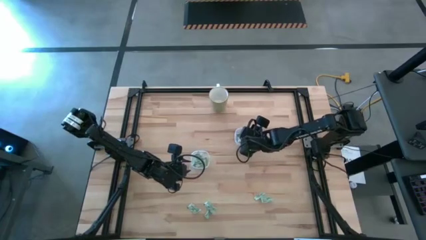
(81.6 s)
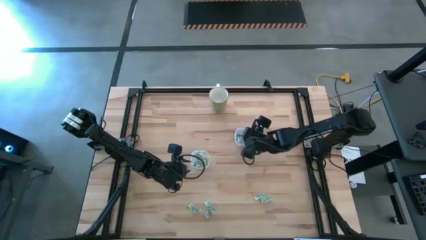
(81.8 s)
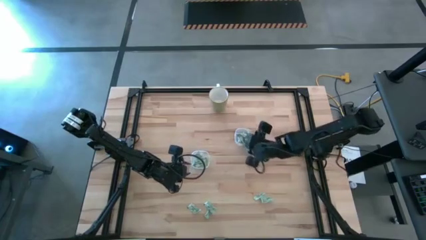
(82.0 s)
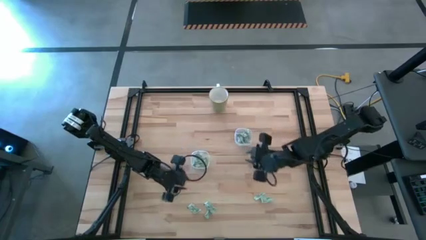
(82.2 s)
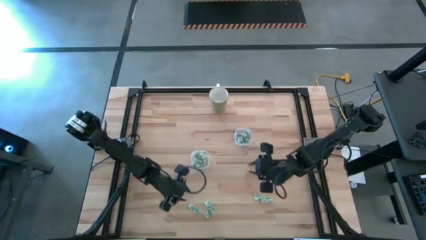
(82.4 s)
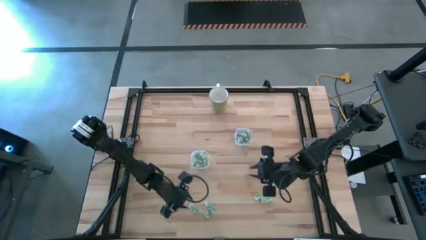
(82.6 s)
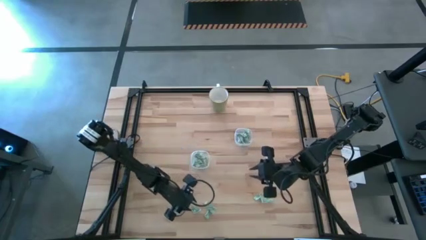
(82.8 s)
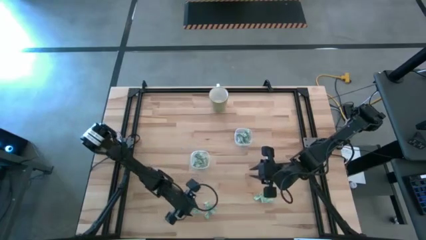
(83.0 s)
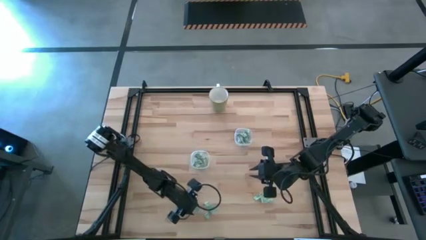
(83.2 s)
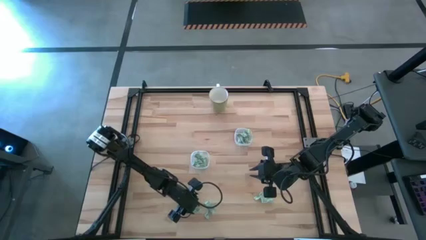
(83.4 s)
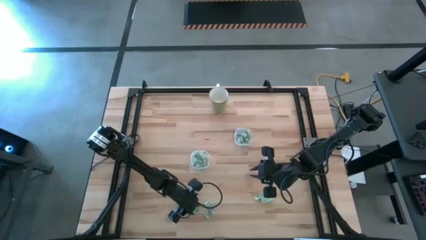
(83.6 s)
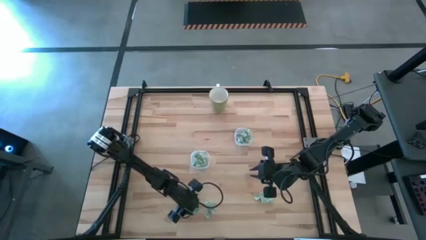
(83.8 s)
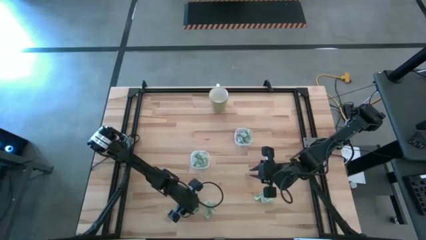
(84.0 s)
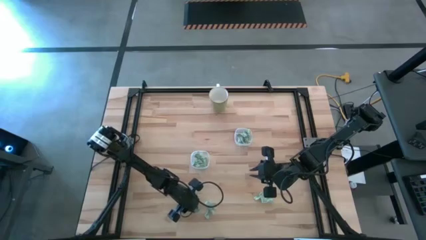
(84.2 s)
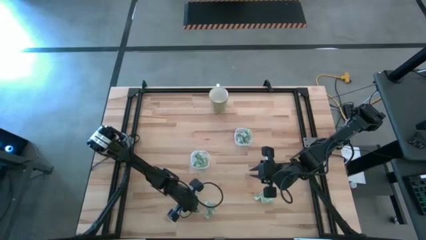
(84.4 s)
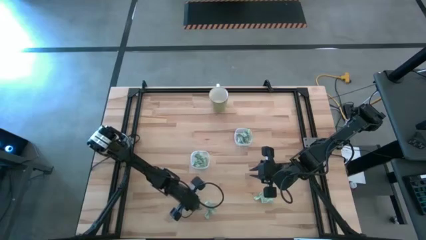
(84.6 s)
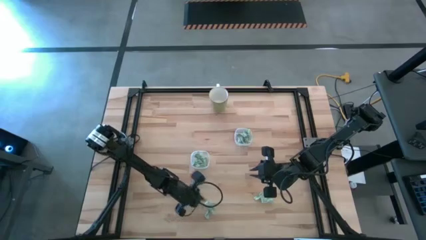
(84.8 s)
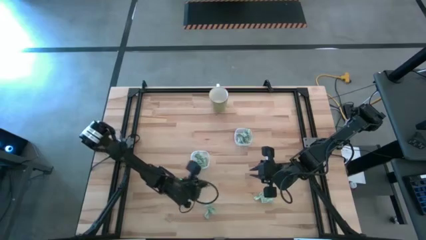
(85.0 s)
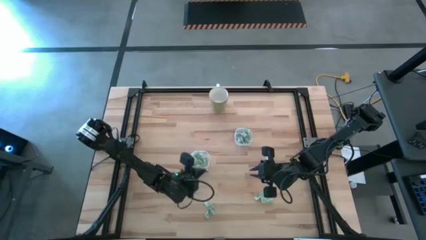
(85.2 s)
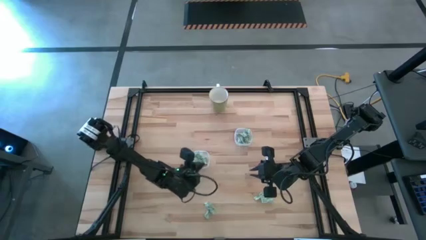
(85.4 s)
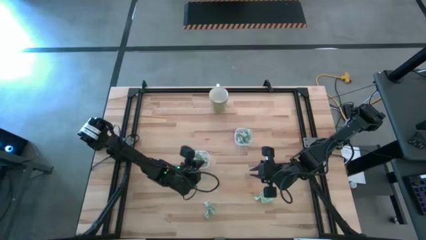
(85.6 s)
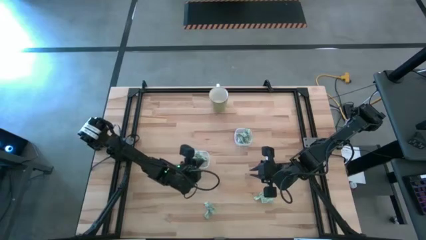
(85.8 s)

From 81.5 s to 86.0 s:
Task: Pick and place Stevia / Truvia into bins
Put the green stevia packet into the left transparent container

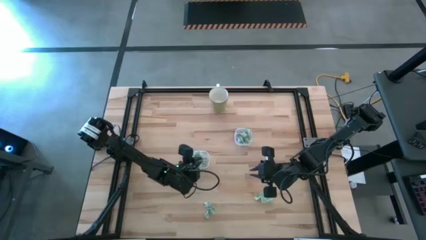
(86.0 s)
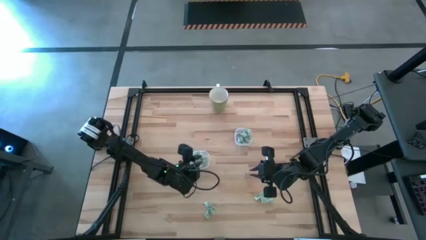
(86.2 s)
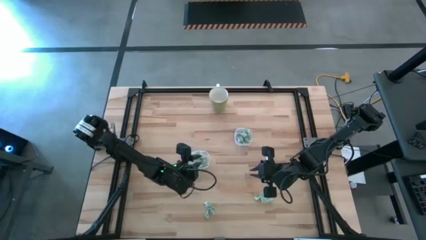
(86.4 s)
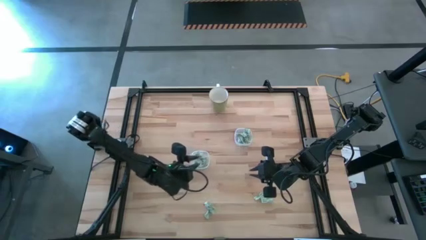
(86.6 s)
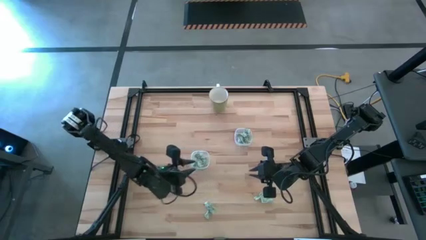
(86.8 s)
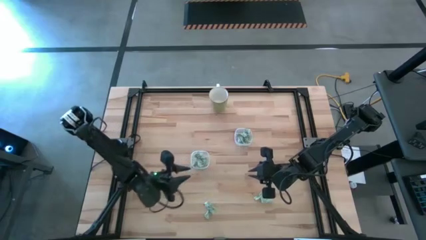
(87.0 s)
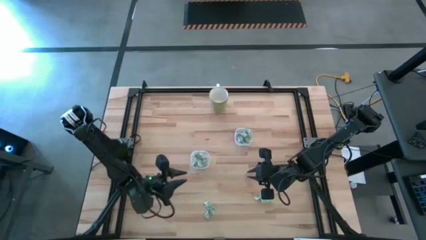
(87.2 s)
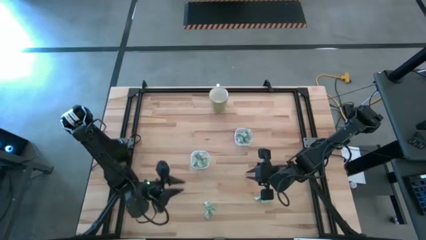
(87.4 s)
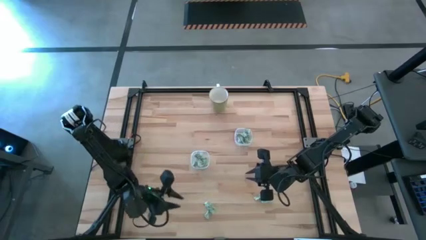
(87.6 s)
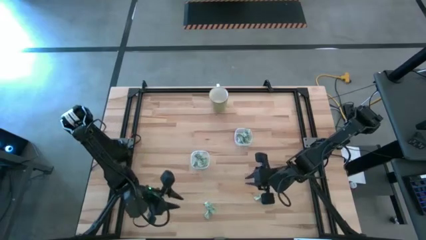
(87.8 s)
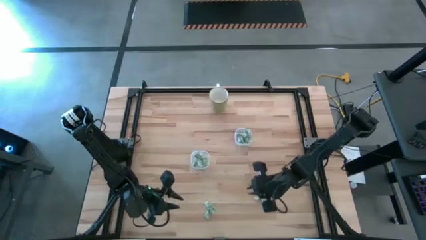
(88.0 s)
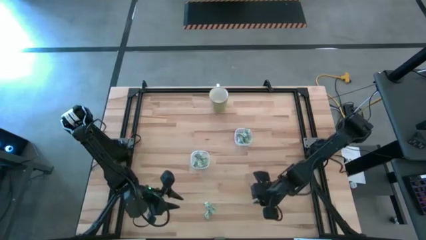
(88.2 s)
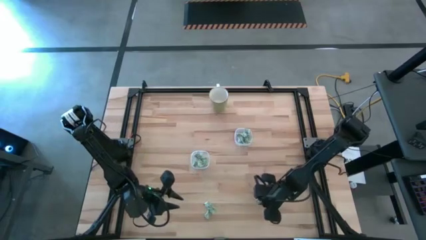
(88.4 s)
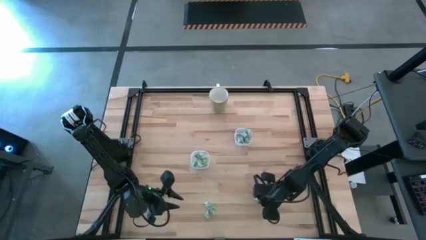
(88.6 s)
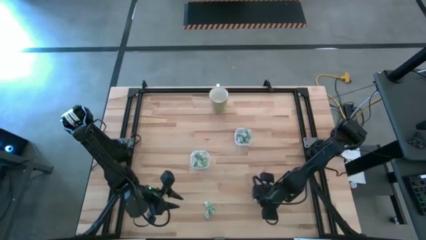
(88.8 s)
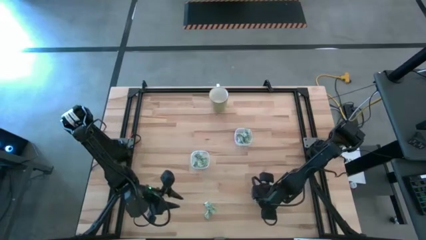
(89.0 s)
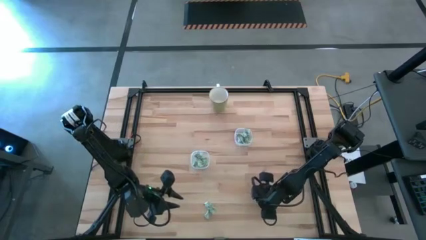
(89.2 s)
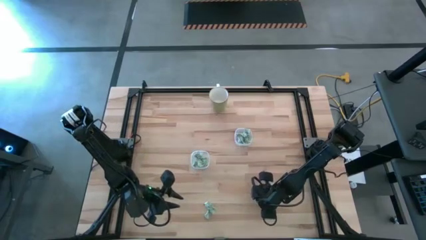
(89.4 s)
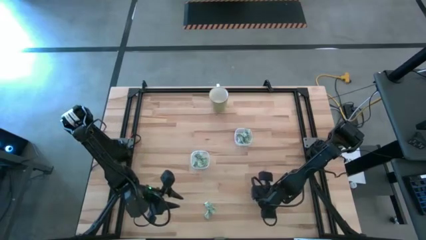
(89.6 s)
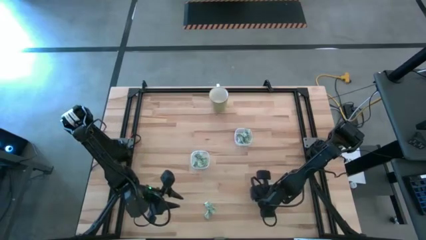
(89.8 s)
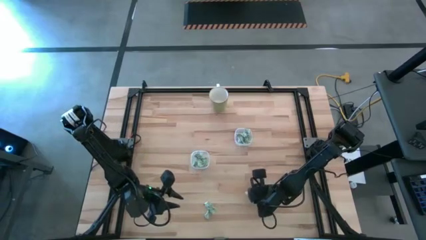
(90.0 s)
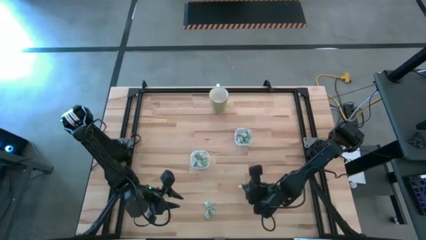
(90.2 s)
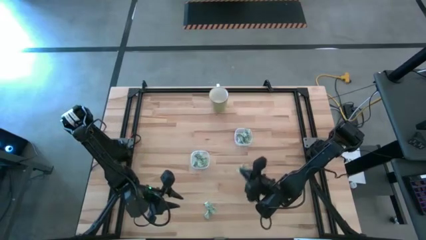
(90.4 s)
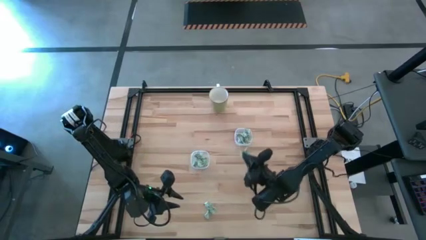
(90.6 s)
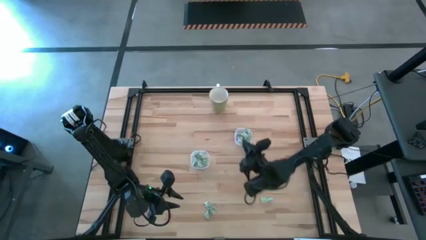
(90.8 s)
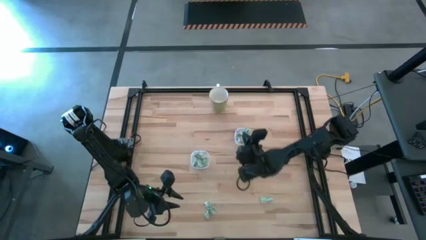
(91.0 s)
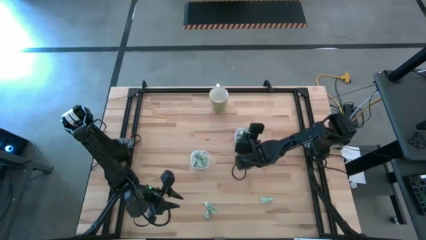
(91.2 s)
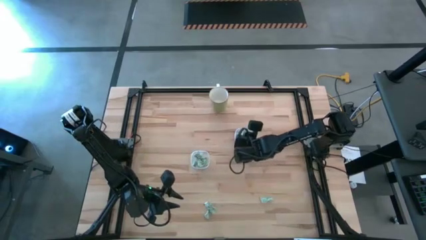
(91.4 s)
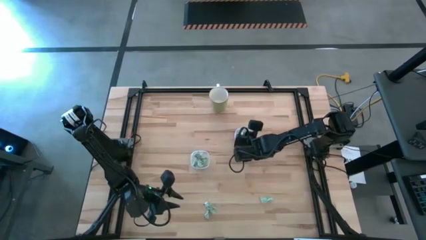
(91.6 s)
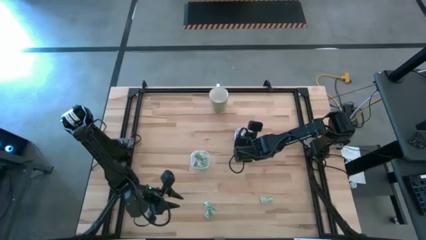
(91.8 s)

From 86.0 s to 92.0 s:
Put the green stevia packet into the right transparent container

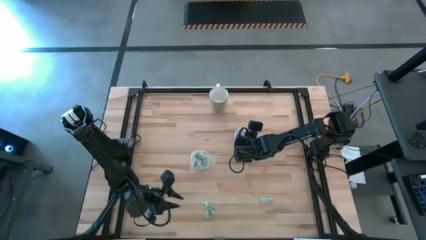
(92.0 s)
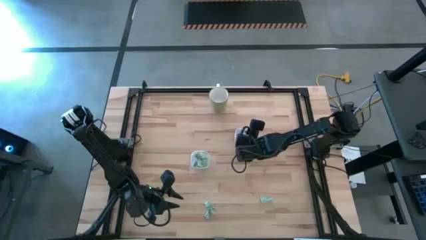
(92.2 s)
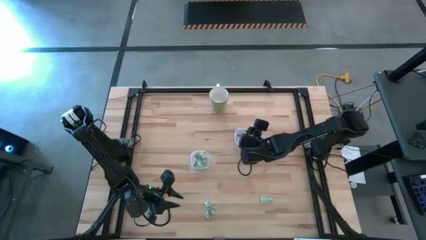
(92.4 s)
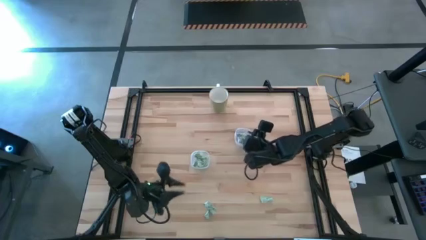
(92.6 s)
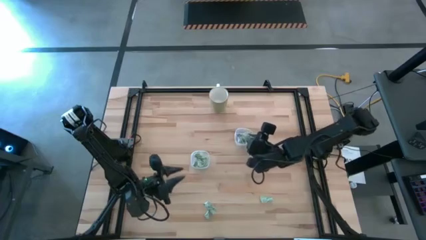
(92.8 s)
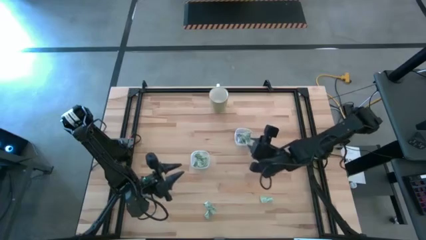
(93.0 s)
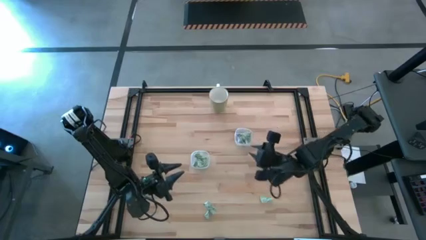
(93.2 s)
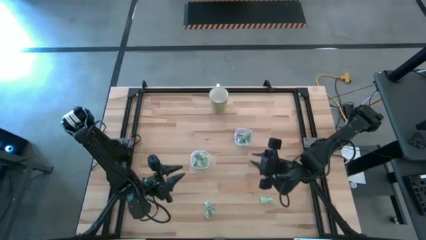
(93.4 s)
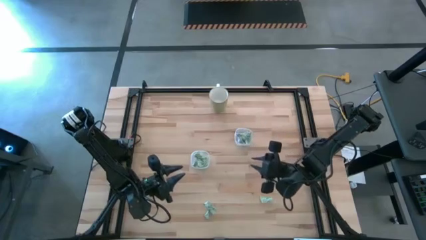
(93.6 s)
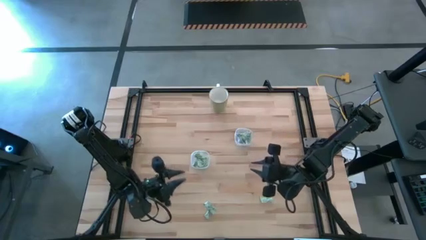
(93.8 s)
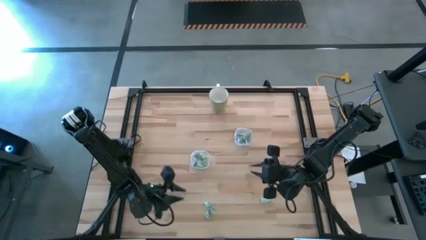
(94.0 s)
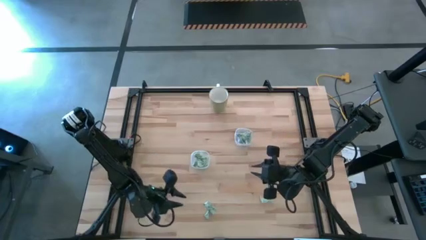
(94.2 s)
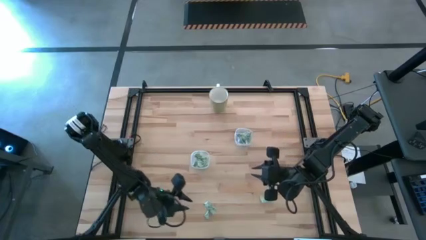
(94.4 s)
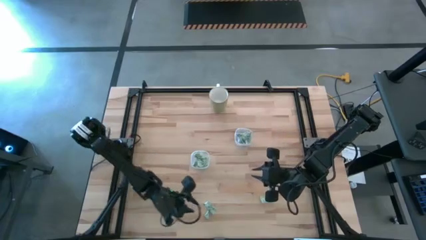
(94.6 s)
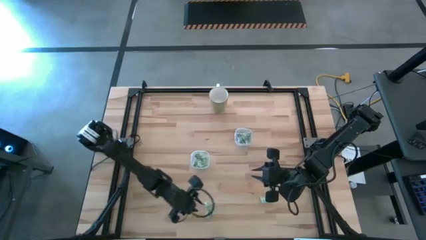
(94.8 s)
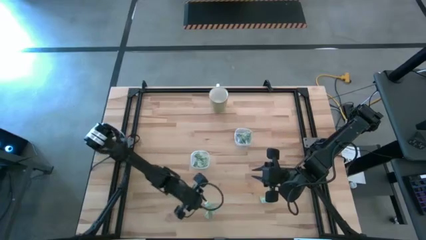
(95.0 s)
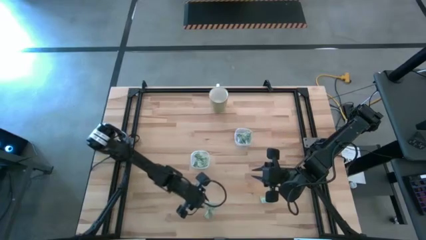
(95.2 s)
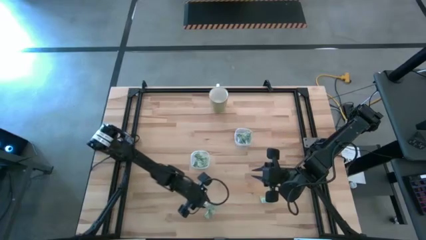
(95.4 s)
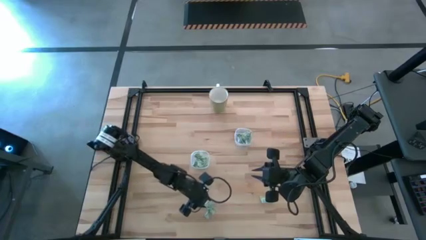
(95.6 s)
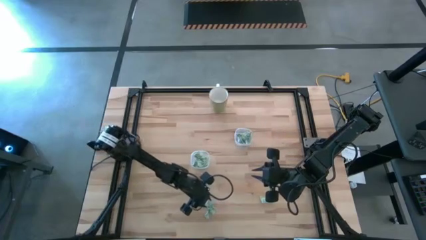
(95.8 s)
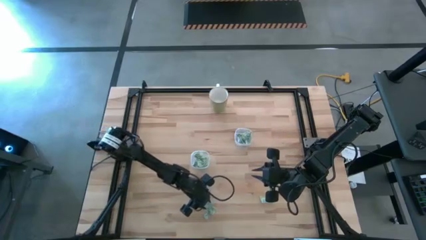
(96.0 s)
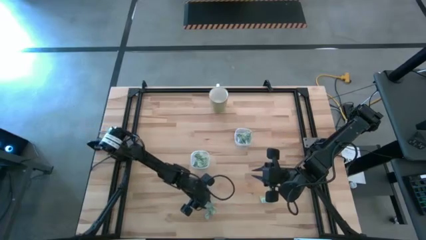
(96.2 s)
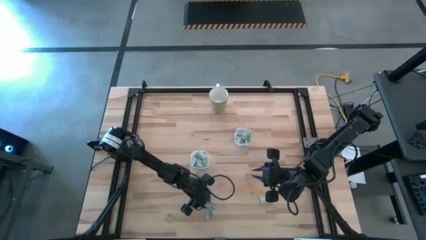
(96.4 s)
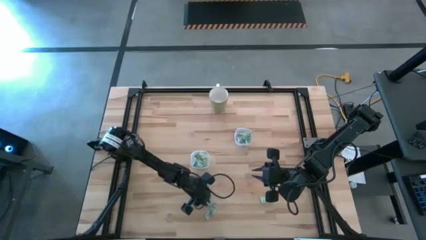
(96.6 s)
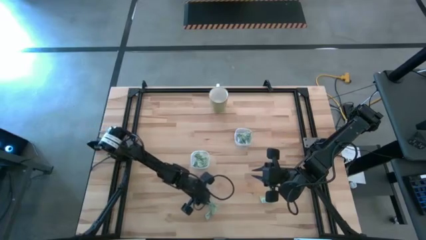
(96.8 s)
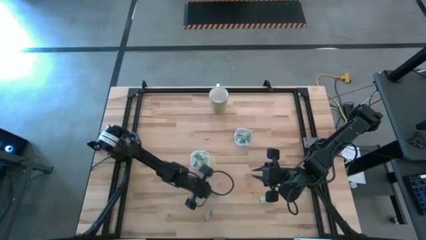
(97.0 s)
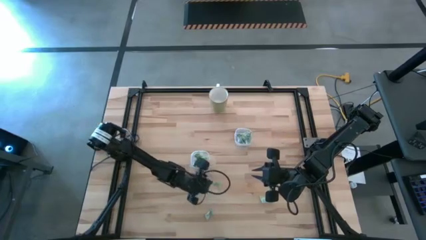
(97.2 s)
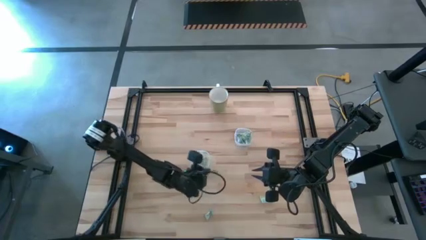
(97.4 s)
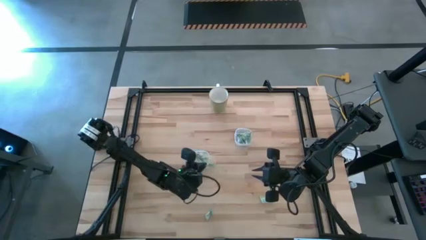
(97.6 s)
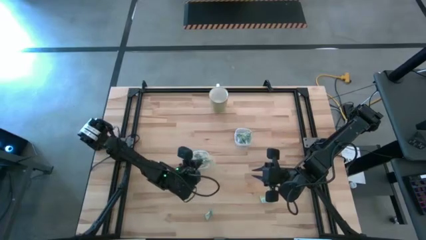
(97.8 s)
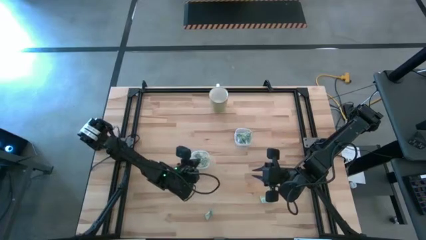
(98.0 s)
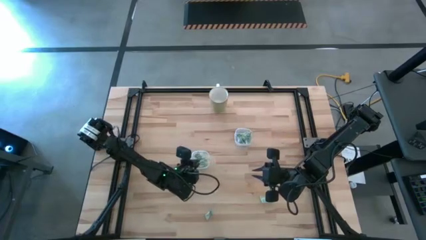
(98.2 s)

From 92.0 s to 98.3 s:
Put the top green stevia packet into the left transparent container

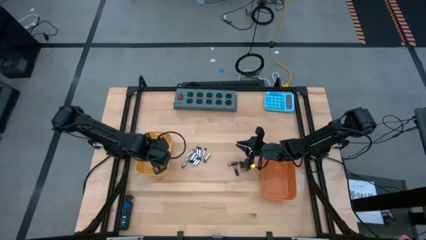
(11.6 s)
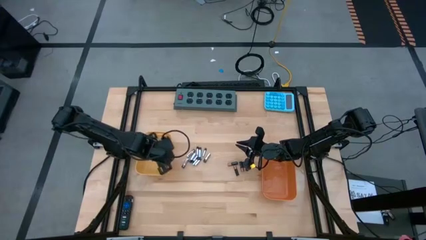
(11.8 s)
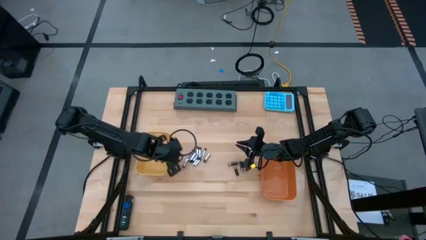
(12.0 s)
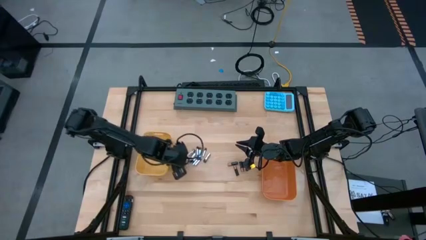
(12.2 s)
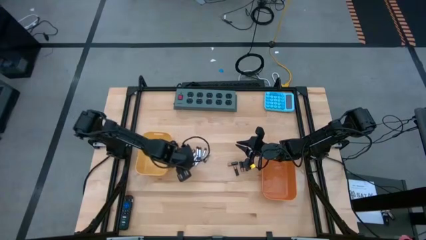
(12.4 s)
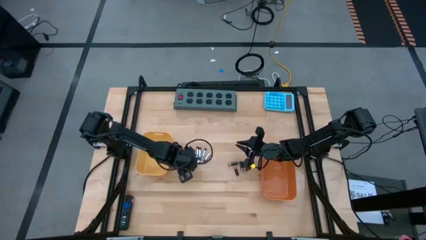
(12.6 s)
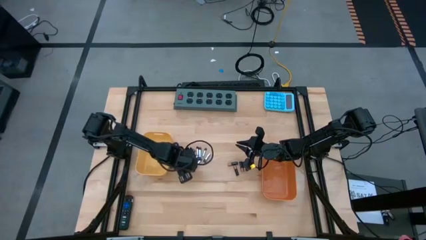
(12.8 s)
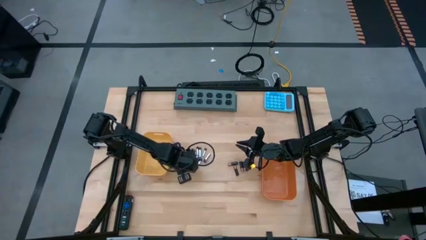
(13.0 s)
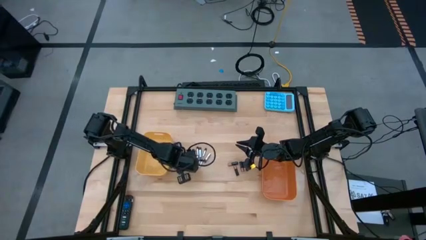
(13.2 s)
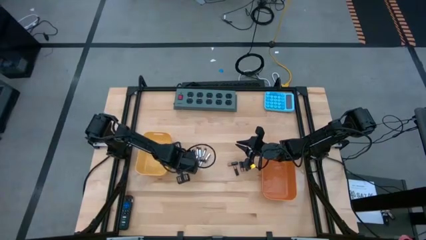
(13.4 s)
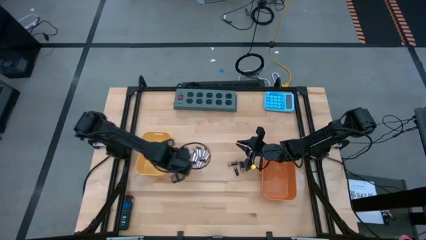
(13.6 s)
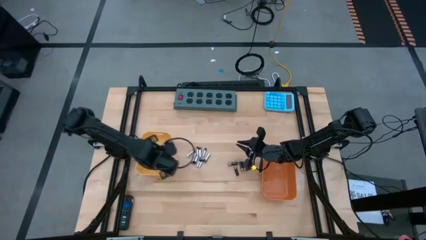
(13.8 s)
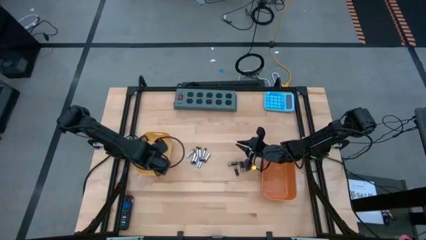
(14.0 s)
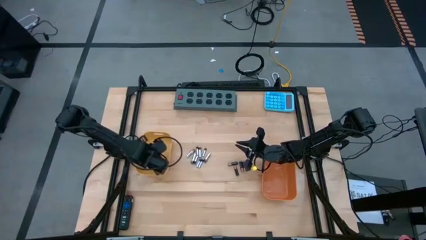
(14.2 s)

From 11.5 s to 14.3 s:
Task: Sort batteries
Put the silver battery into the yellow bin
